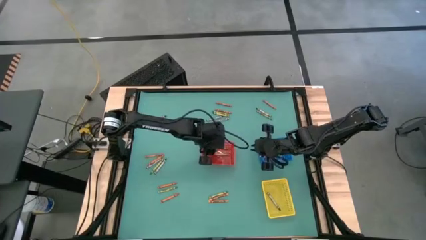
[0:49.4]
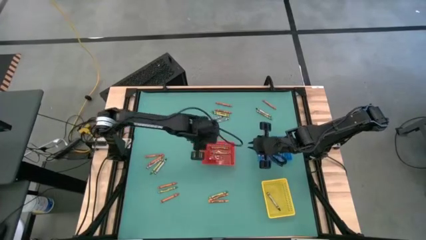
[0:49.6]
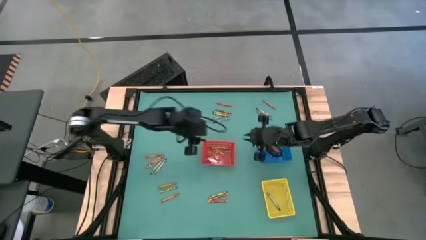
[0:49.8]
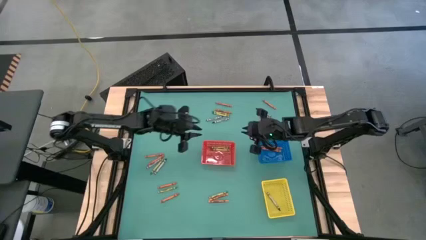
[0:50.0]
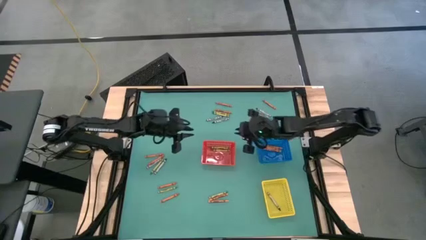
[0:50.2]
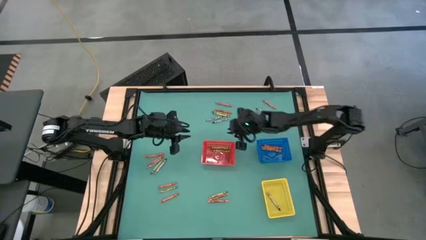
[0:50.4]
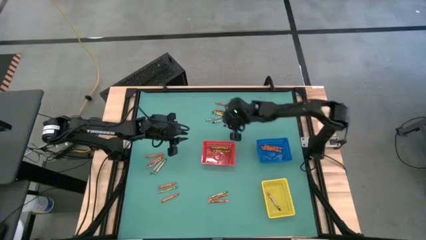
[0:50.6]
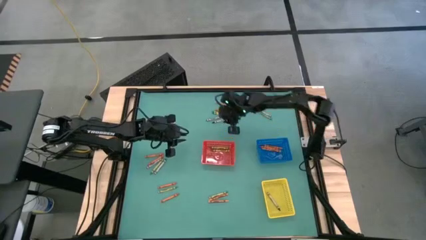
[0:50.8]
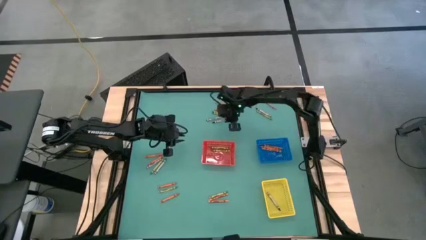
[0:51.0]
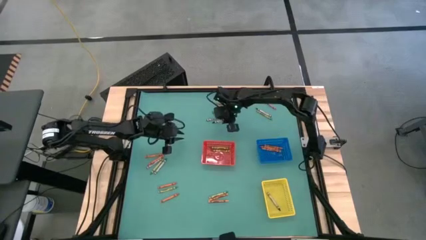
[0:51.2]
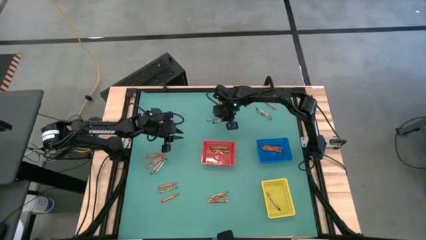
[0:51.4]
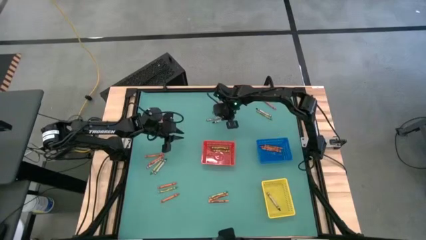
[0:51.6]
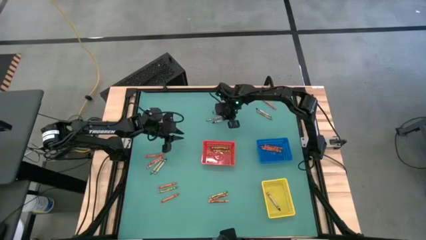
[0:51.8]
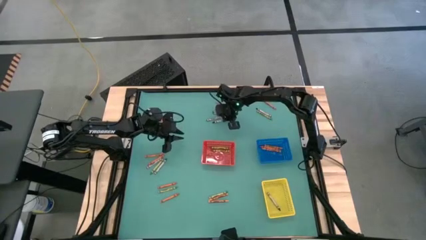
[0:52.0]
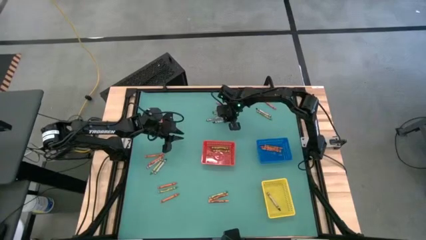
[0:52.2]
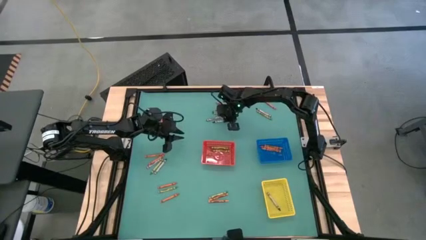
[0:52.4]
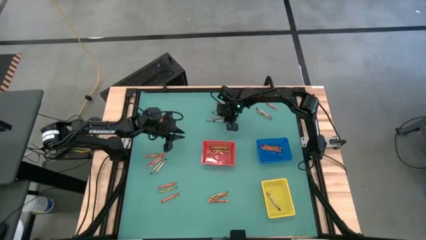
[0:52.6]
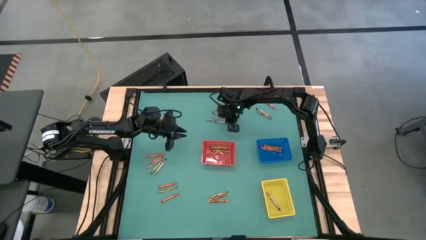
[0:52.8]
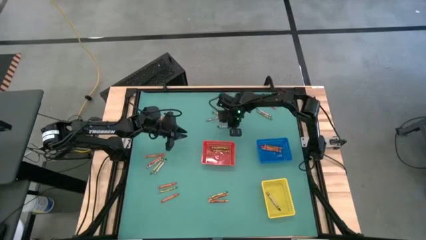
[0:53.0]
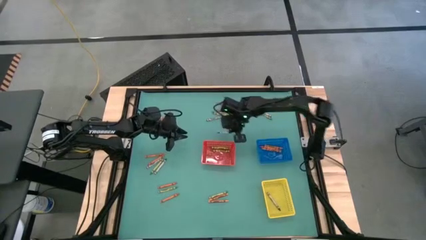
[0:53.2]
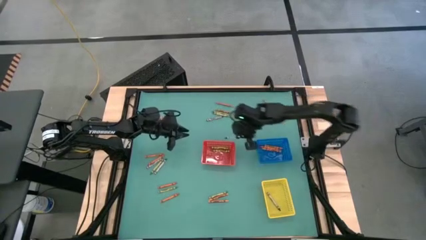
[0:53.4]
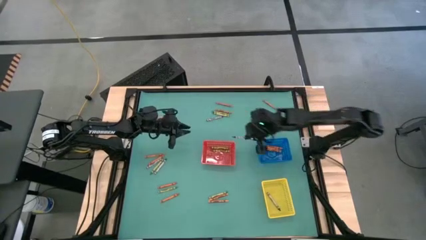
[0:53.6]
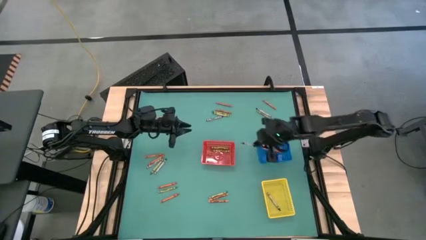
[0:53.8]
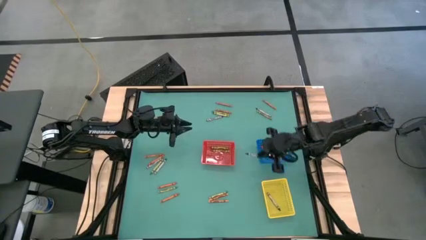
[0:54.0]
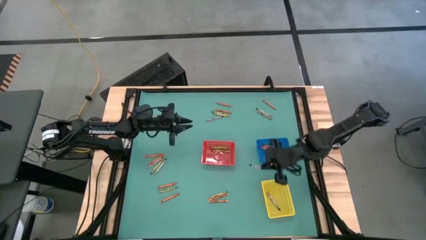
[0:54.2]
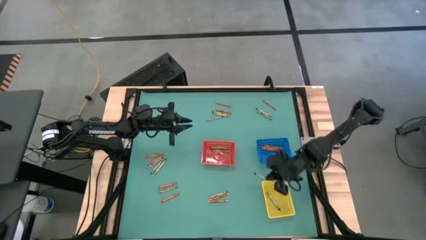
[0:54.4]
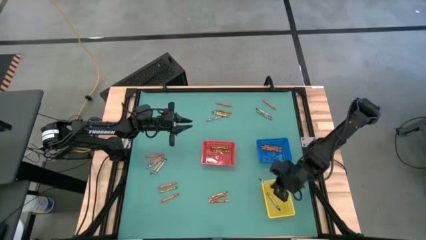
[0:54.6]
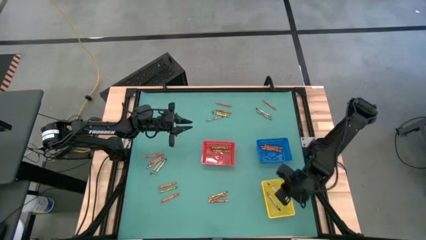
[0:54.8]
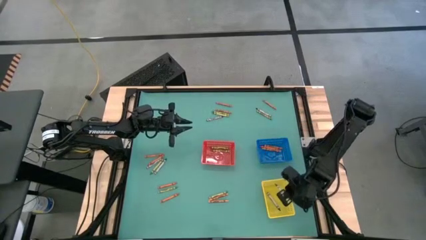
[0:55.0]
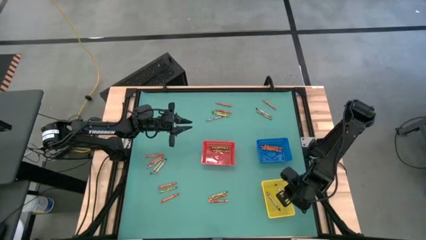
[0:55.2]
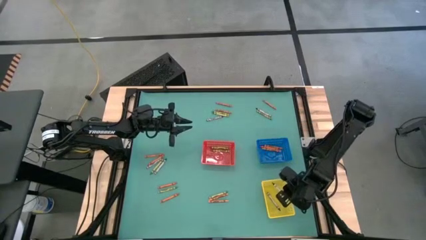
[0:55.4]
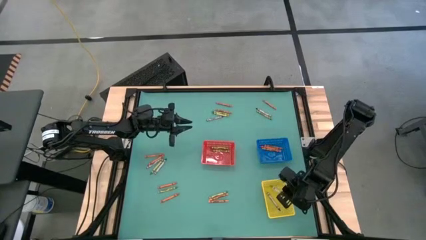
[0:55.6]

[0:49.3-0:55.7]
Task: Sort crayons
Put the black crayon into the yellow basket

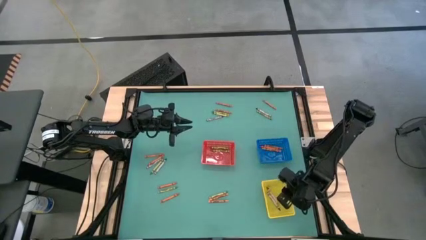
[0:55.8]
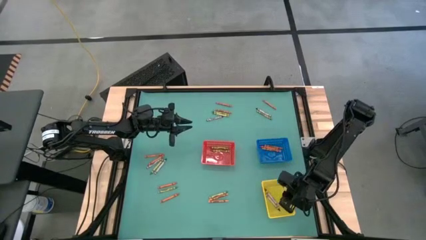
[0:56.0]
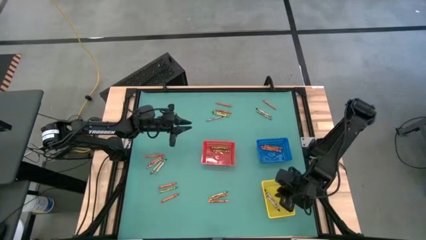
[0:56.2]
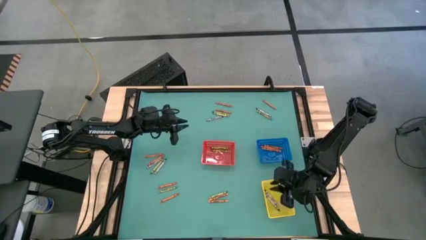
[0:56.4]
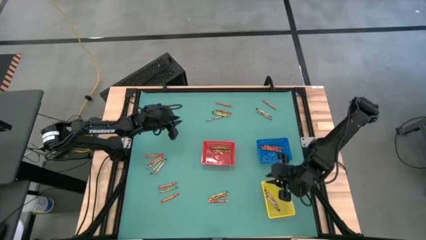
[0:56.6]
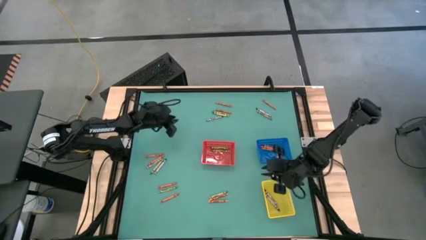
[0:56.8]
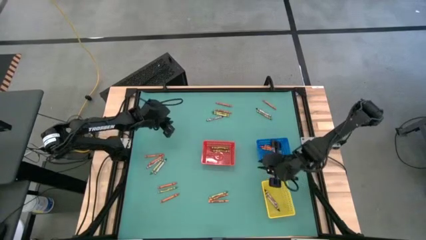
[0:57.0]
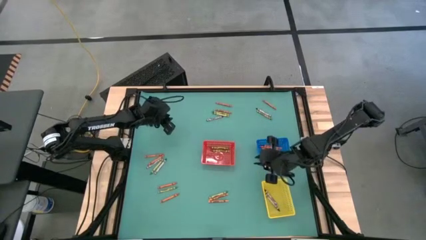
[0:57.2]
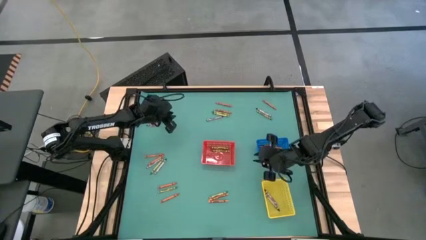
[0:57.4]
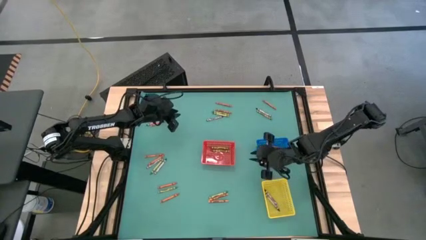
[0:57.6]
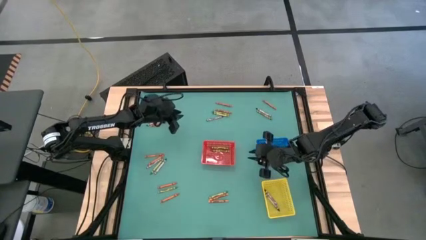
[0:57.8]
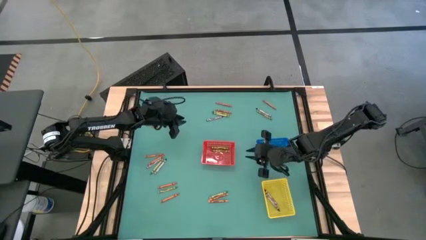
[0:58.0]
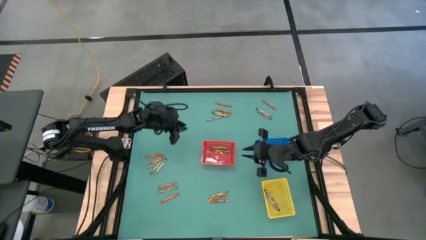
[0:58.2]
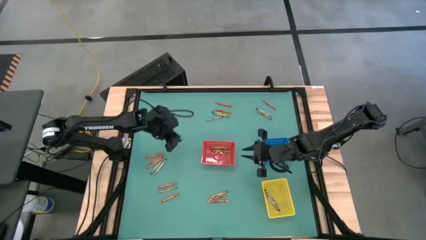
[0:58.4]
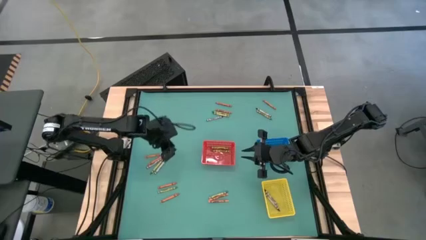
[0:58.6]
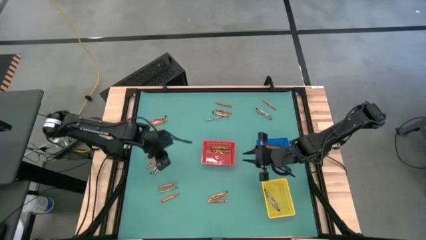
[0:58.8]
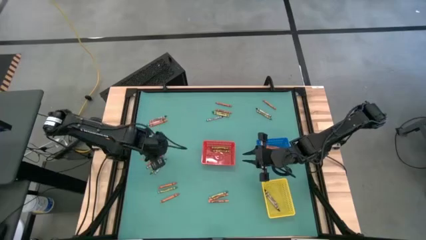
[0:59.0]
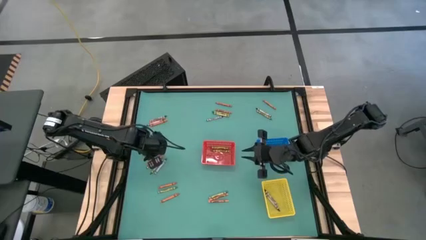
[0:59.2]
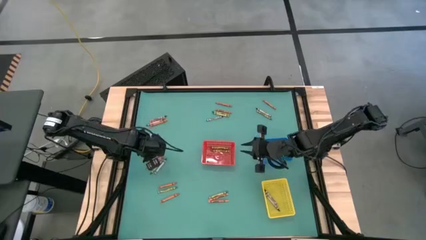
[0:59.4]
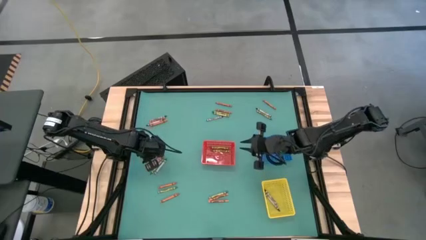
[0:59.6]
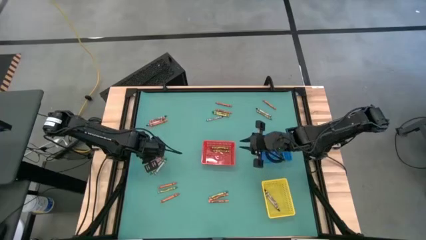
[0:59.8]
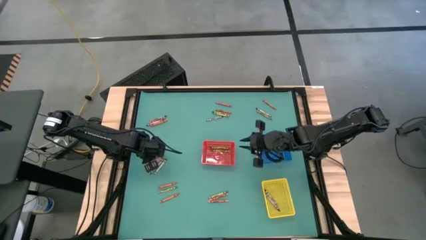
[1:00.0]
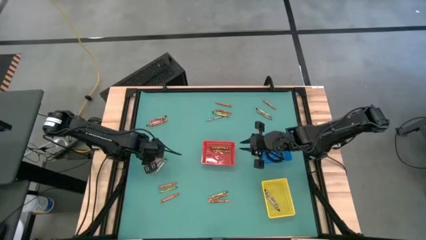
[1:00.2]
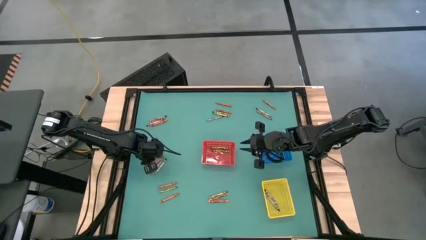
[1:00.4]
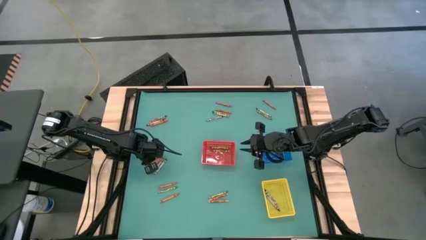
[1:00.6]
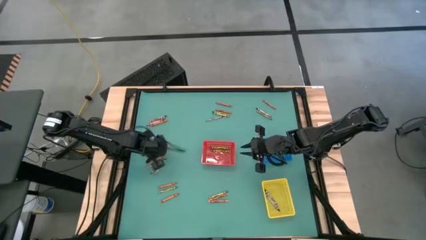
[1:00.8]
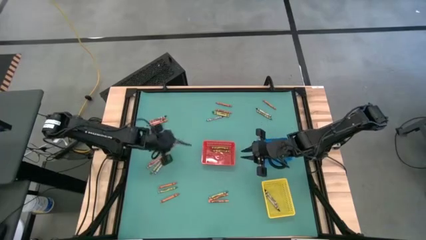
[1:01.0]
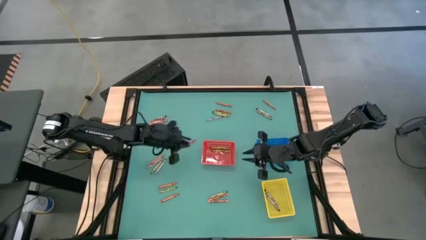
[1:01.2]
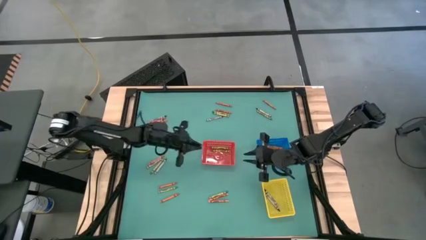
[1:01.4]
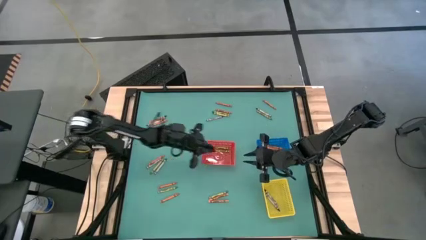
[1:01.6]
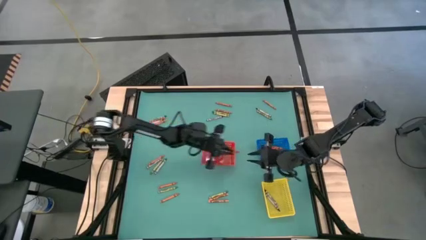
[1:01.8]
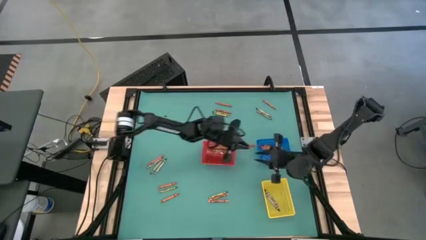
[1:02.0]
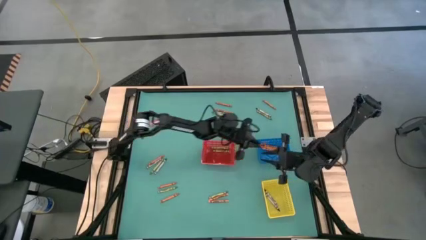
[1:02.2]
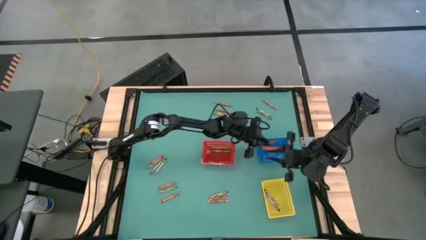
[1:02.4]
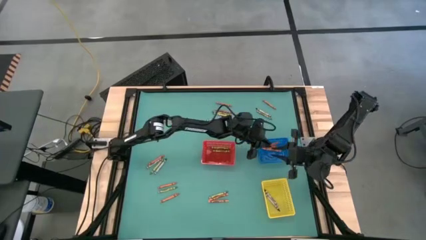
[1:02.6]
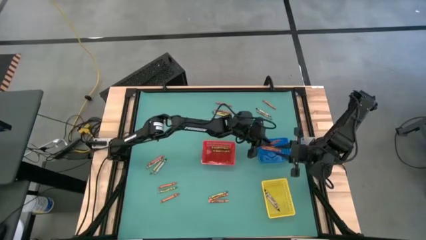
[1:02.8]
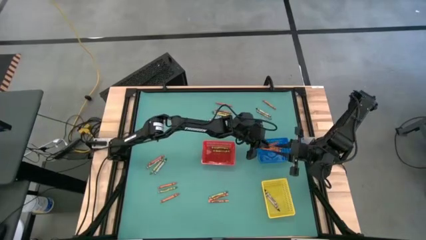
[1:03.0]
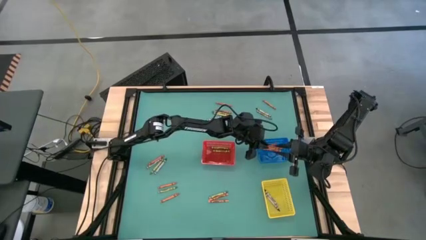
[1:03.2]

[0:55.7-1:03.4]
Put the orange crayon into the blue basket

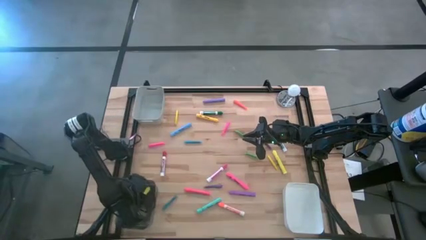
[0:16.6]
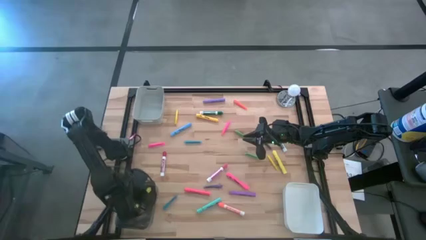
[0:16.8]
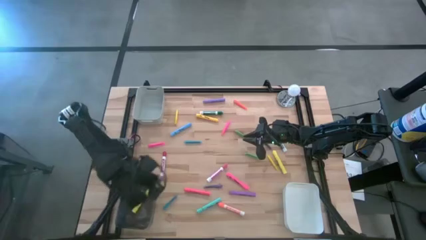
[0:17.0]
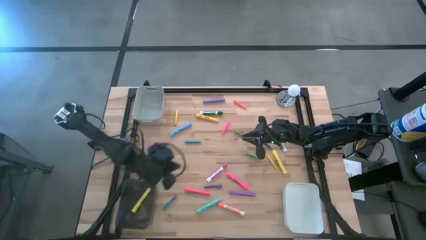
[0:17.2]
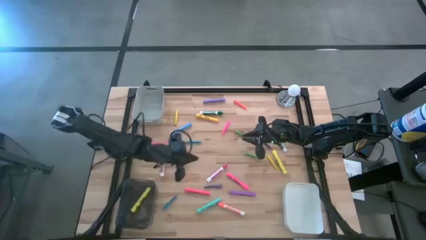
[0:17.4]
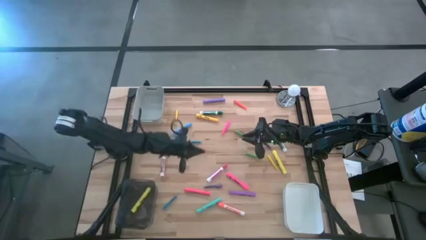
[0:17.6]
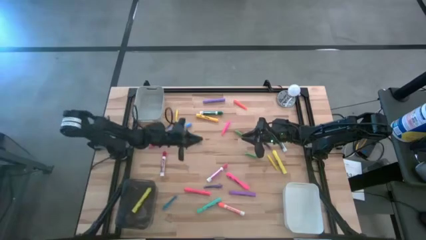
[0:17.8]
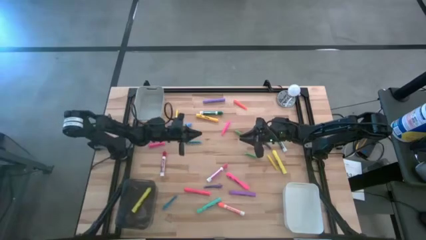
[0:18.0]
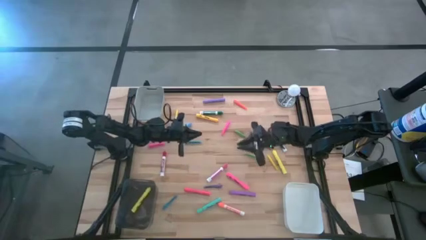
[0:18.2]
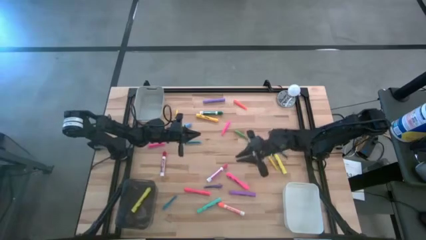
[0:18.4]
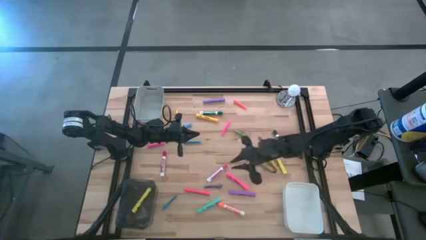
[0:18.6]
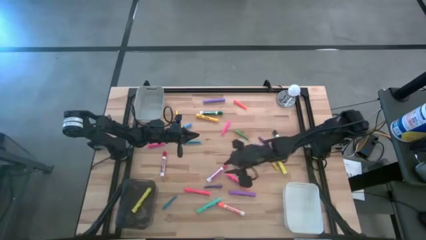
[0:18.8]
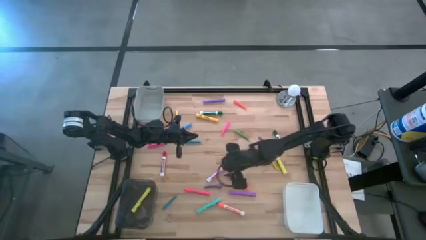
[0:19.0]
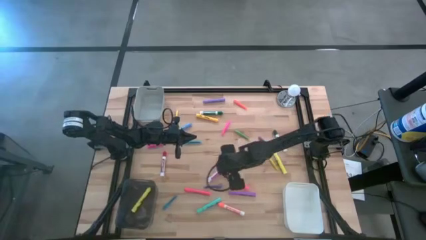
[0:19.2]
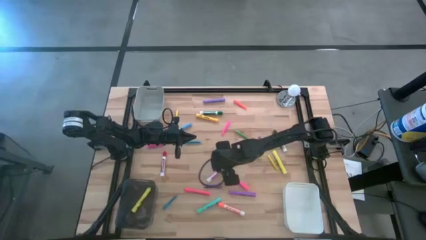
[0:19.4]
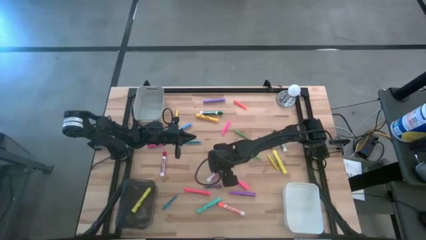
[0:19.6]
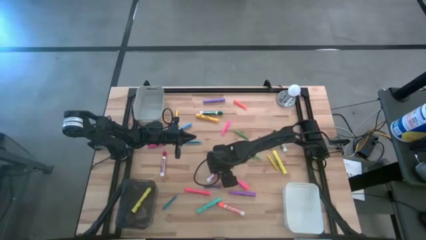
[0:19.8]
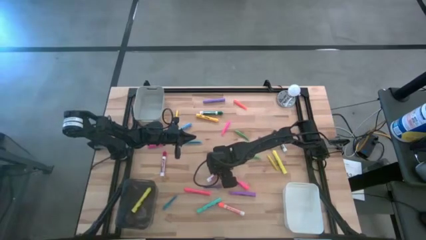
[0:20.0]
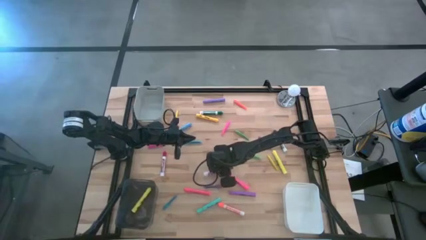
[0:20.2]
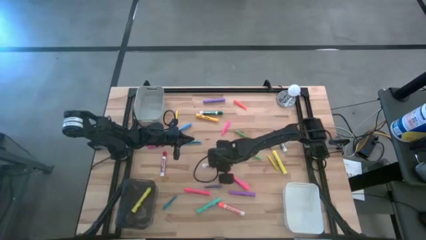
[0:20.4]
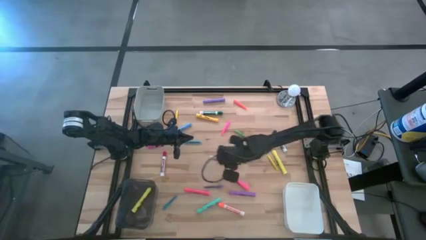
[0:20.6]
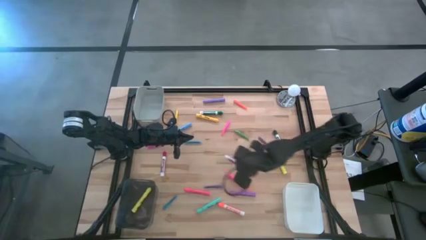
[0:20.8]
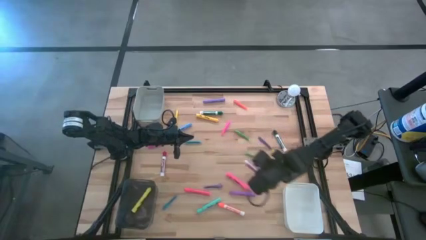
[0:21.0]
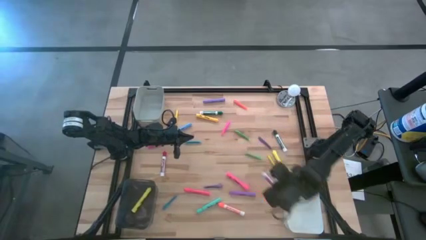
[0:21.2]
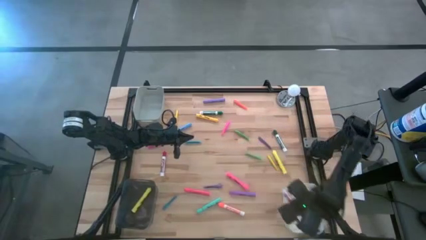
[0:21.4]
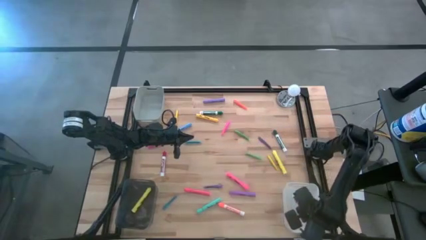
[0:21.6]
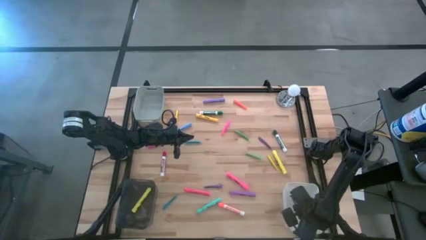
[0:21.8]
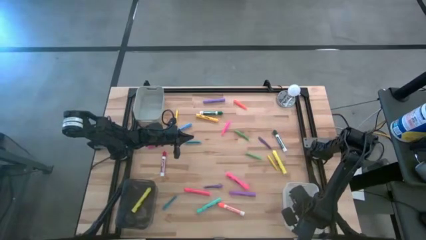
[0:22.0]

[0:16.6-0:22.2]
Task: Pick & Place Markers
Put the pink marker pen into the white bin
